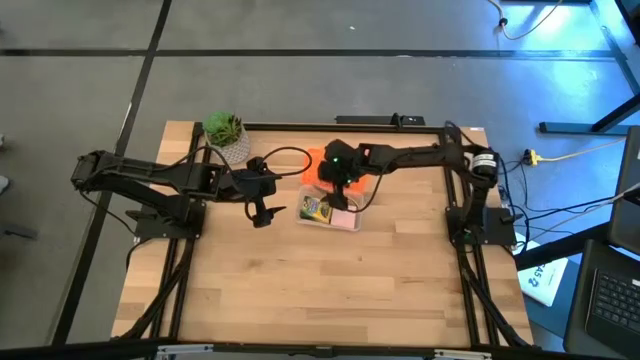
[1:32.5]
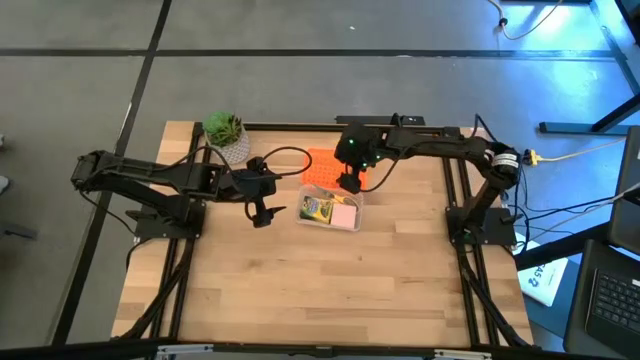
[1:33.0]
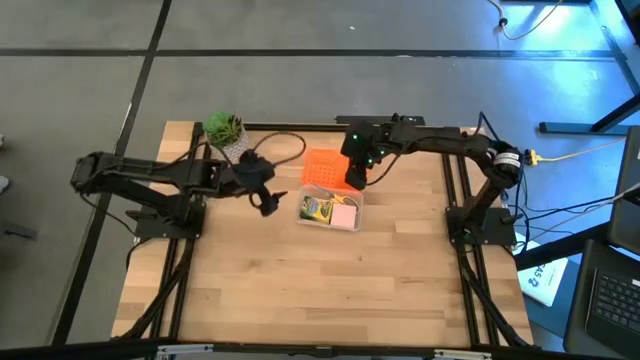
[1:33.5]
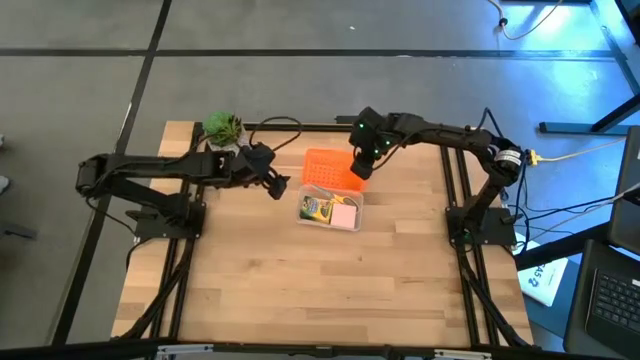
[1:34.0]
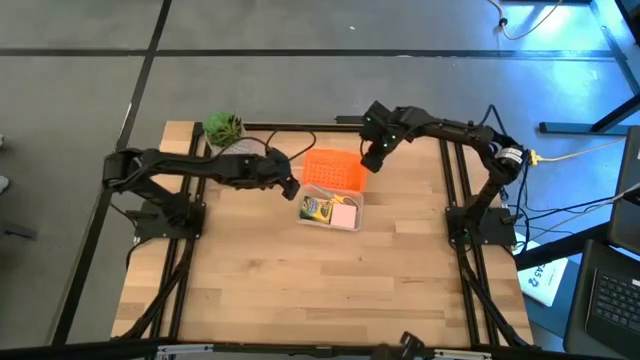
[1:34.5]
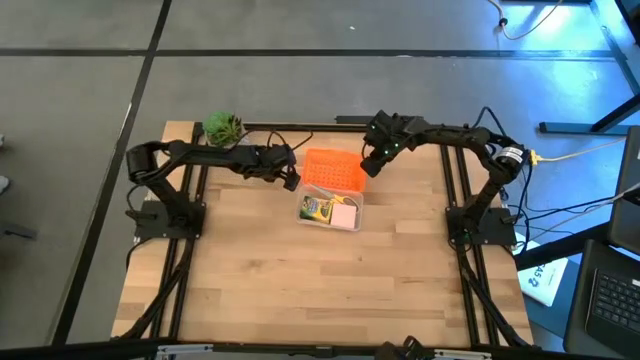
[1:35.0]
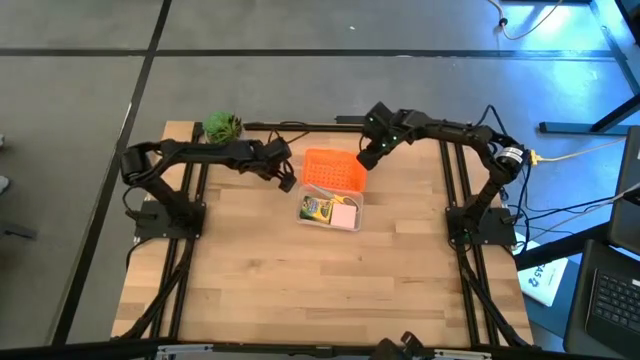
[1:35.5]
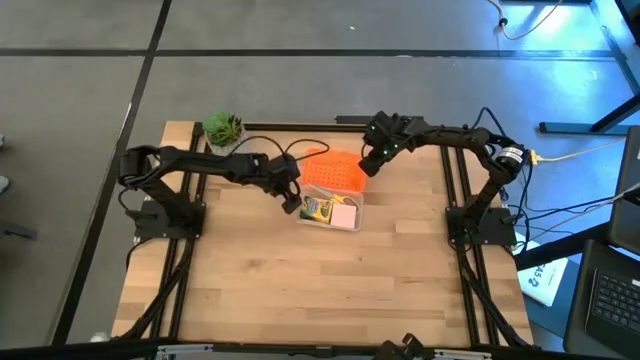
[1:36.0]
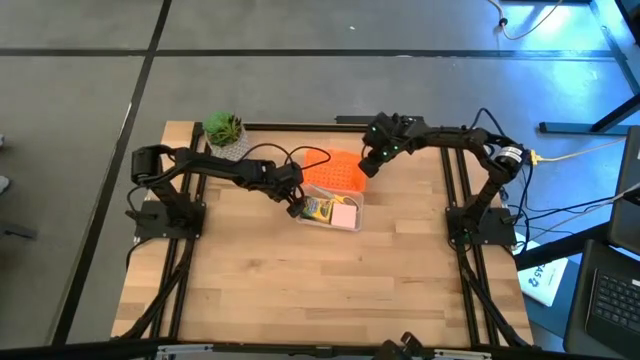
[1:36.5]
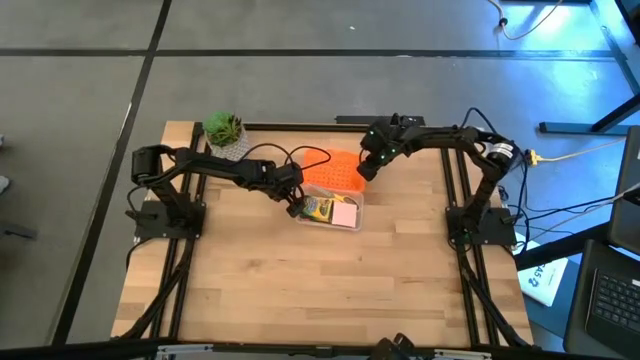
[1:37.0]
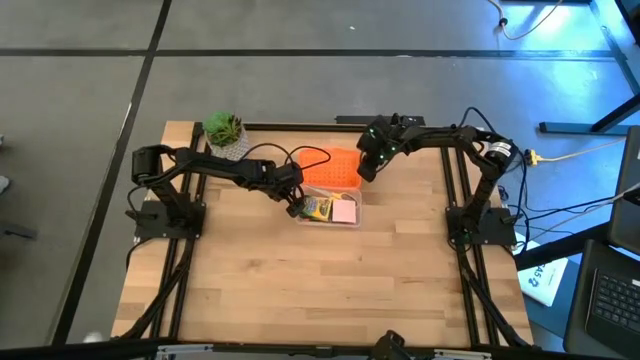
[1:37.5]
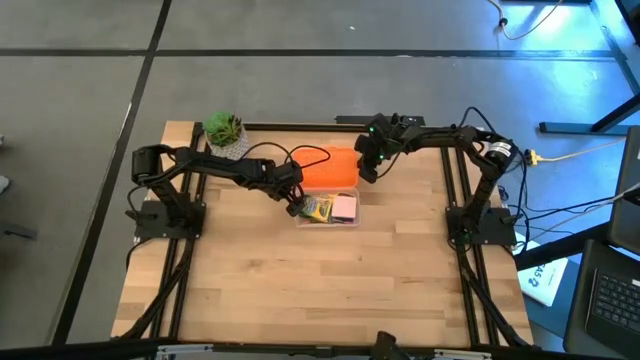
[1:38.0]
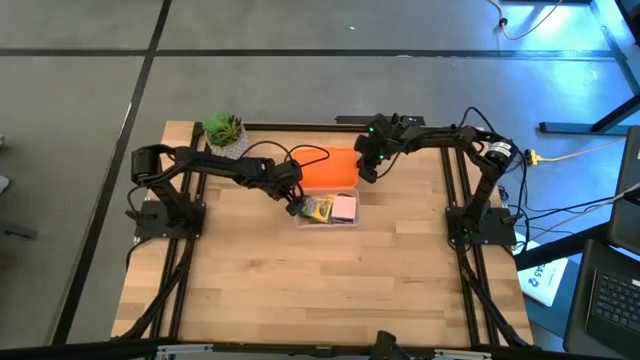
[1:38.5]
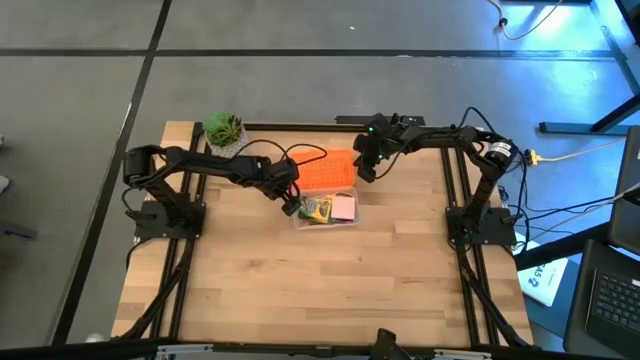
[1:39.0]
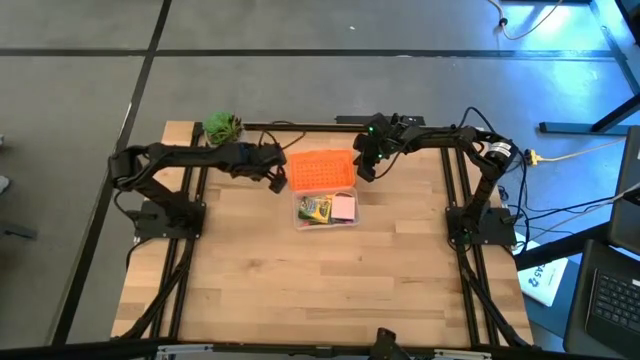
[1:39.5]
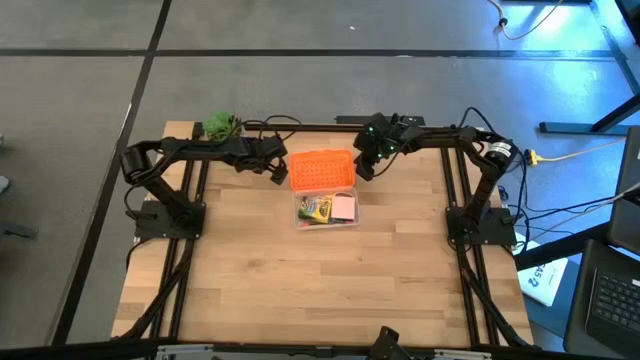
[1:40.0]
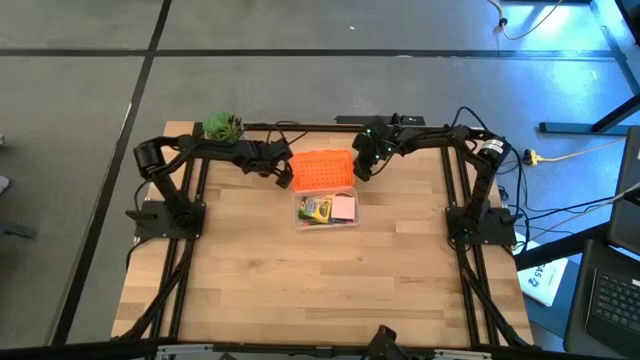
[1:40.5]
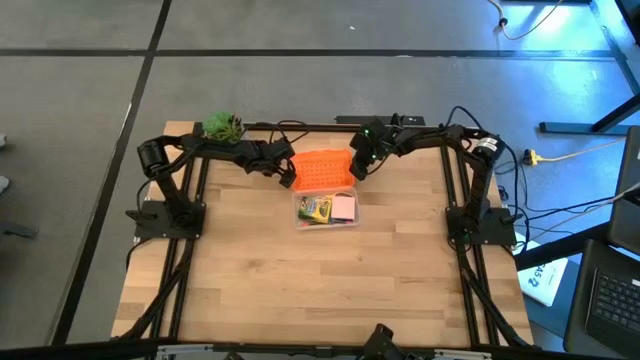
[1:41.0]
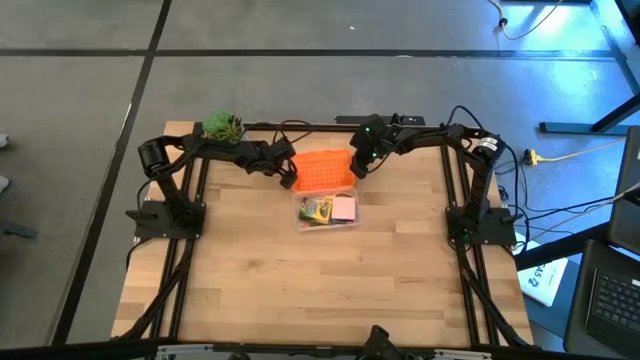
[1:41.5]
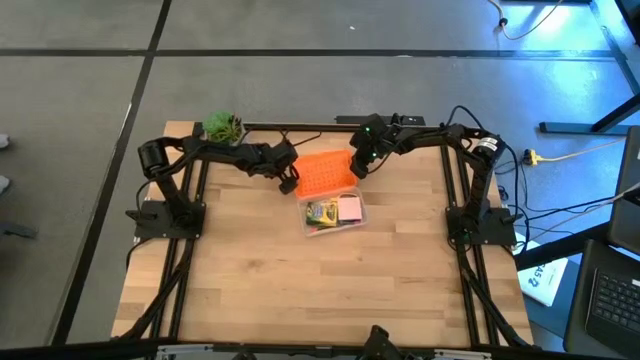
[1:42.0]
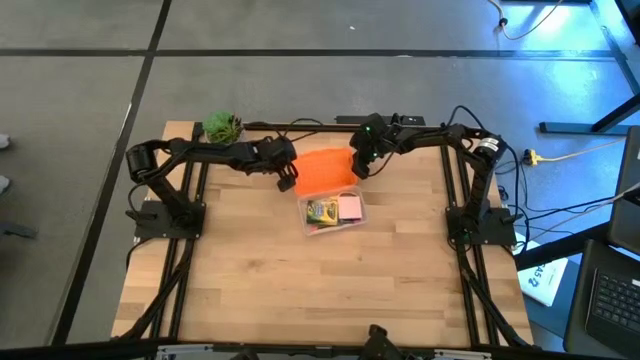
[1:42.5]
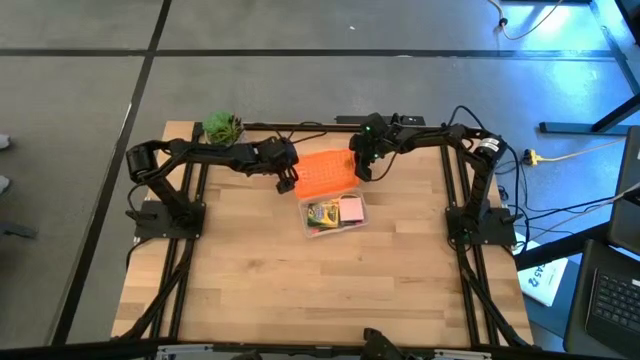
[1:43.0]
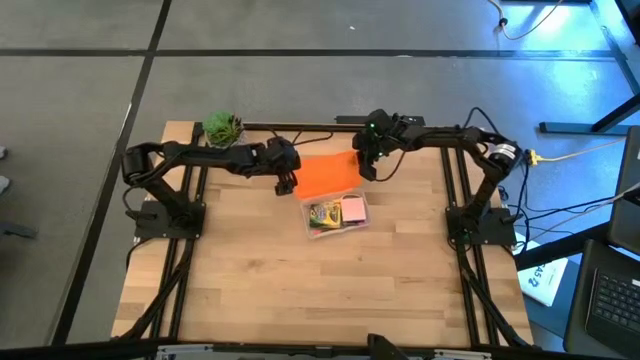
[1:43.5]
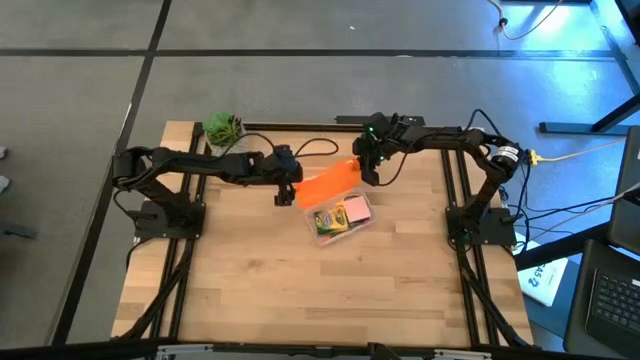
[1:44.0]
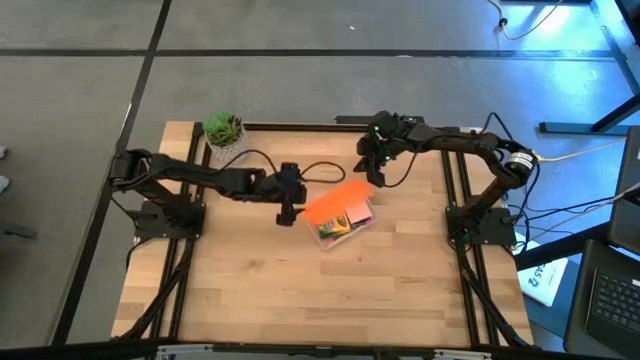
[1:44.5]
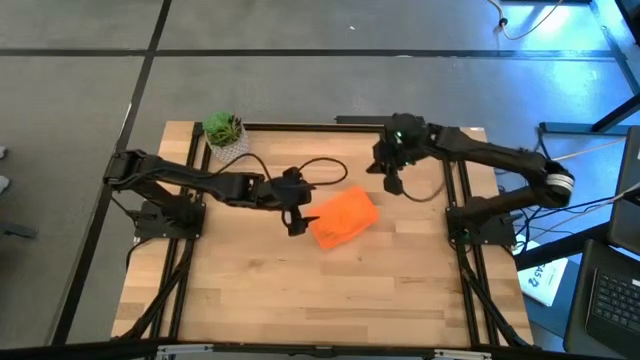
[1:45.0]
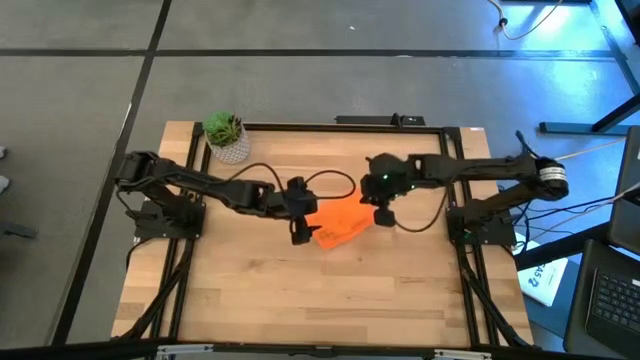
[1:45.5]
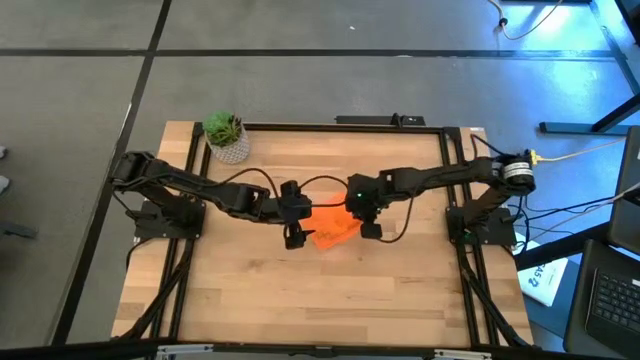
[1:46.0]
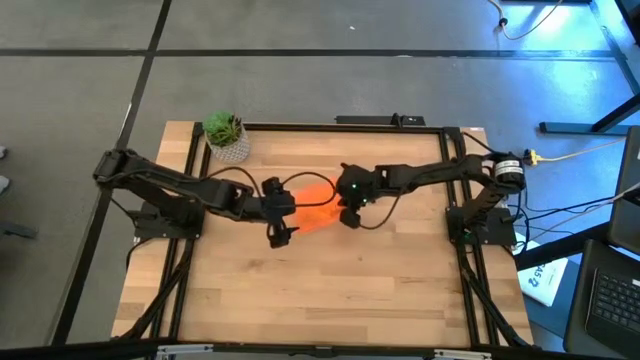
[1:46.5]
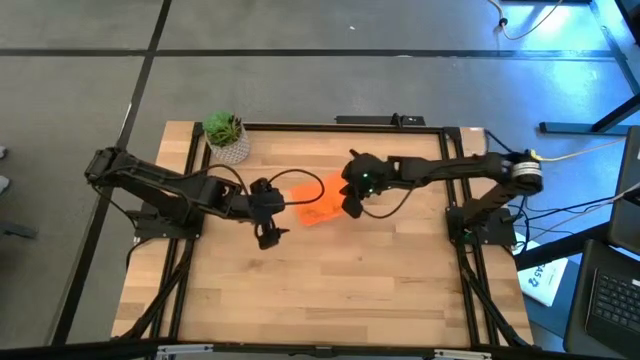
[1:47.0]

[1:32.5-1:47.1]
Task: Pack school essentials
Close the orange supply box

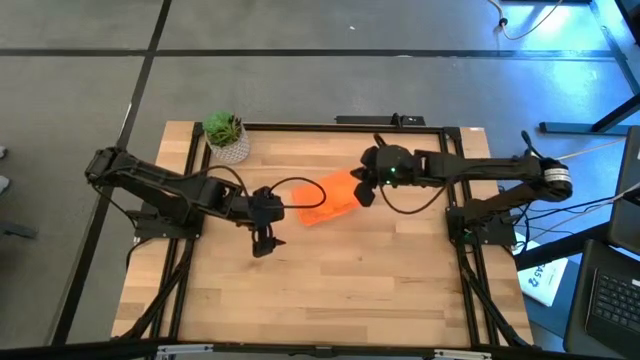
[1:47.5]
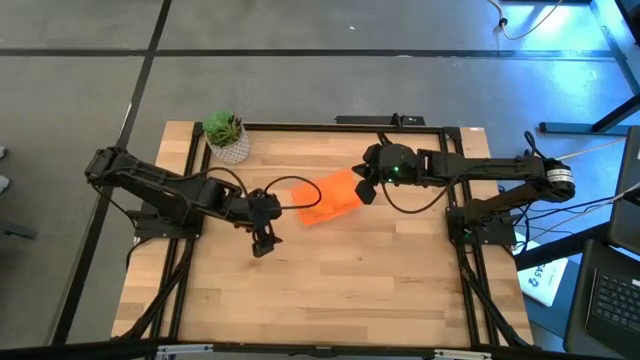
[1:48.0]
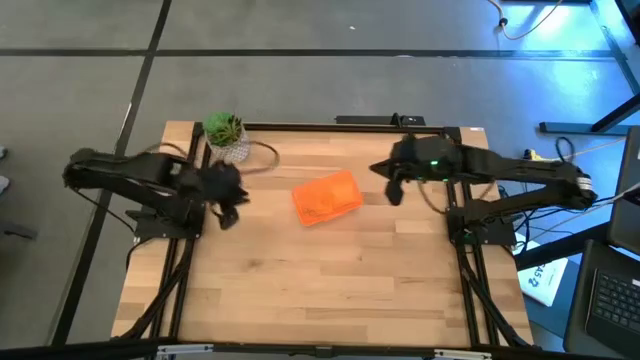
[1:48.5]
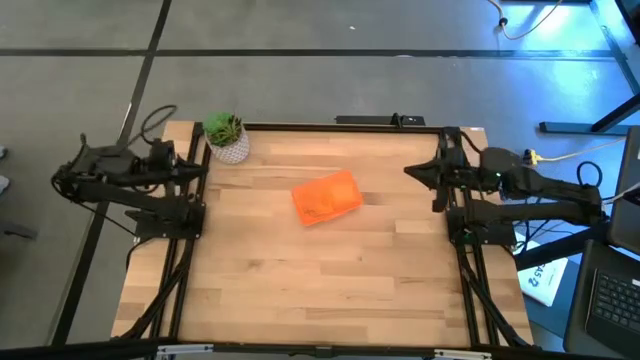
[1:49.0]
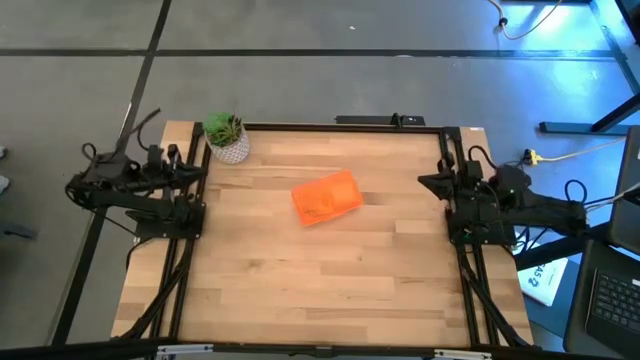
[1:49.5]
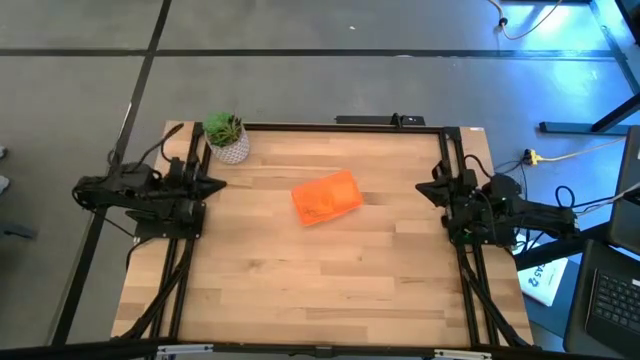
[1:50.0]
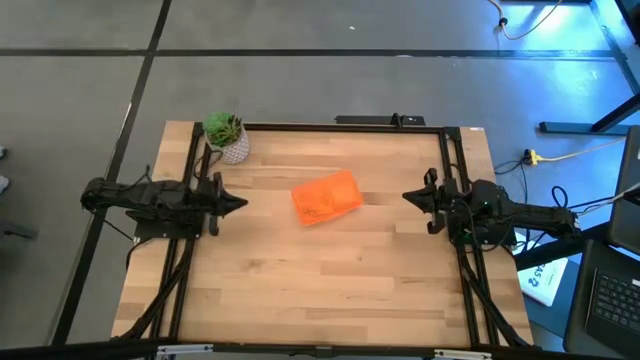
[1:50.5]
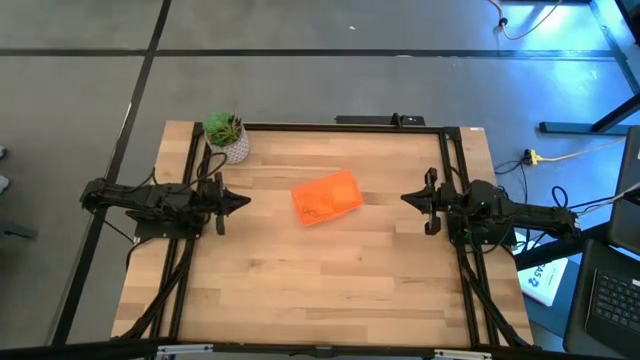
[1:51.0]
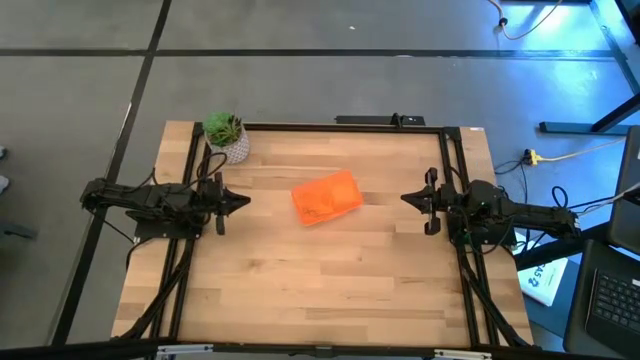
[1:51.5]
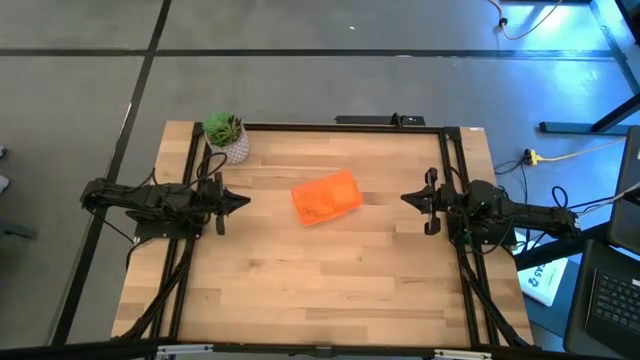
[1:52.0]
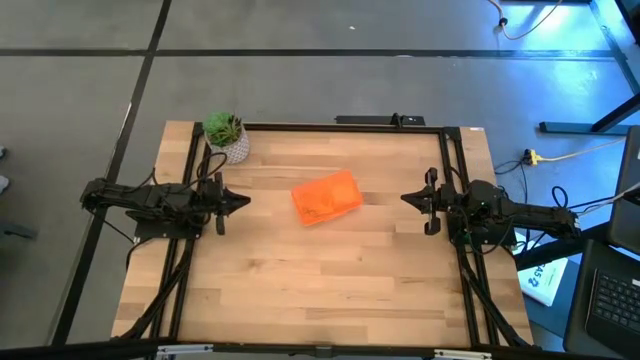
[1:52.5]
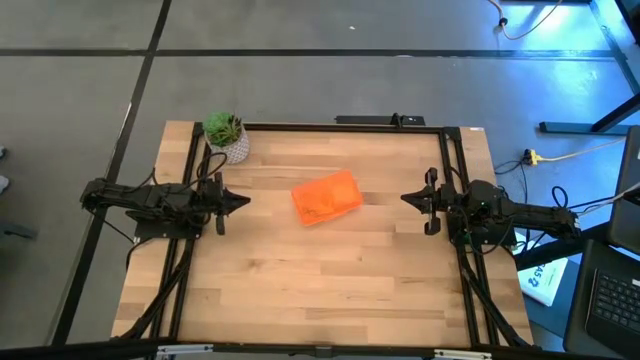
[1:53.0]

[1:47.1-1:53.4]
Return to Home Position
